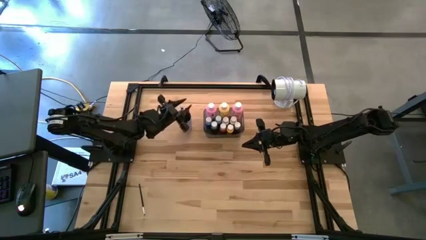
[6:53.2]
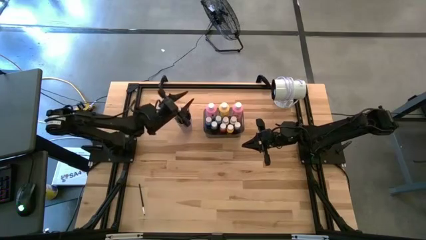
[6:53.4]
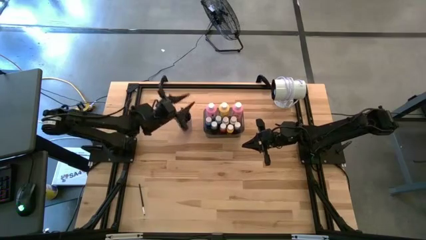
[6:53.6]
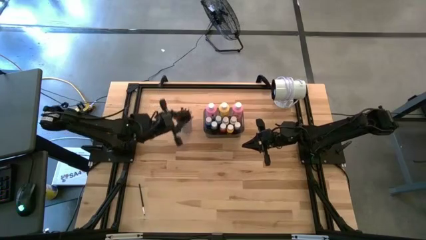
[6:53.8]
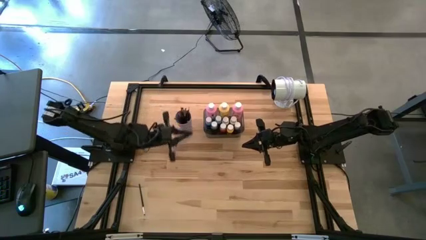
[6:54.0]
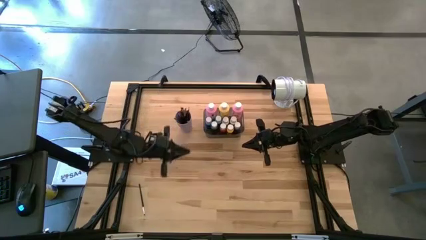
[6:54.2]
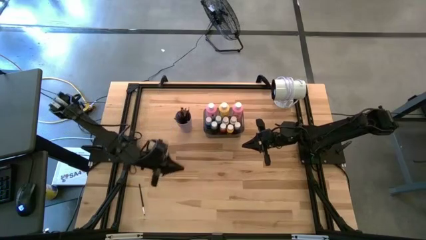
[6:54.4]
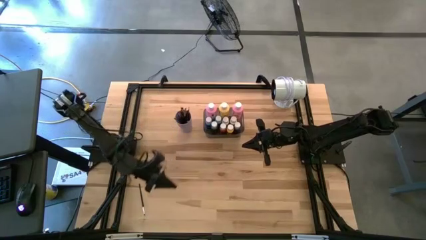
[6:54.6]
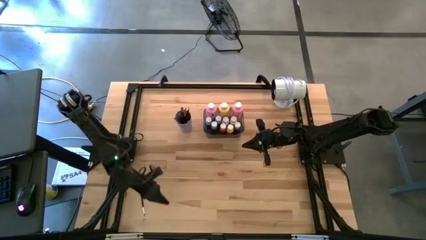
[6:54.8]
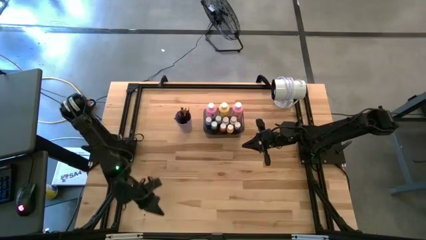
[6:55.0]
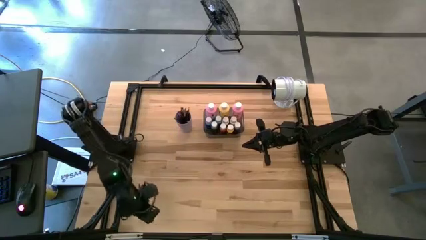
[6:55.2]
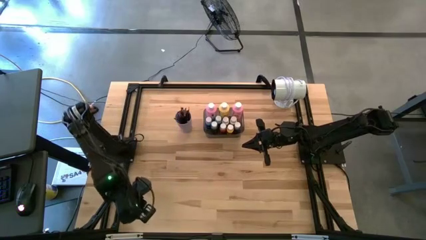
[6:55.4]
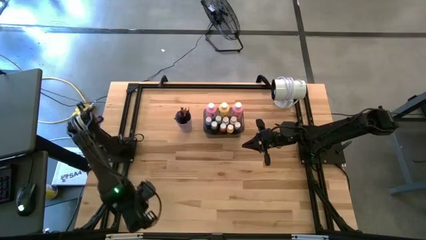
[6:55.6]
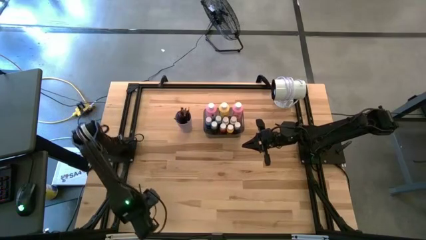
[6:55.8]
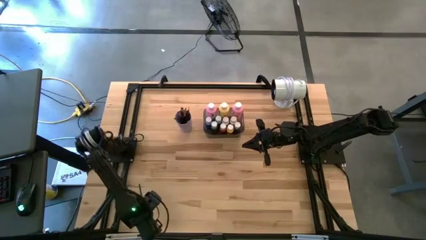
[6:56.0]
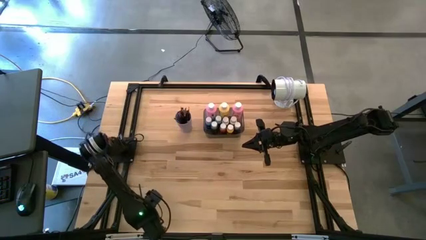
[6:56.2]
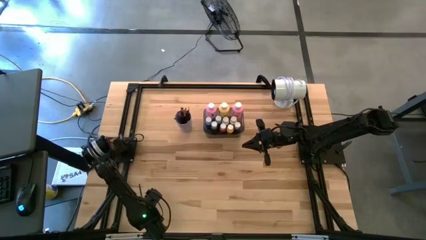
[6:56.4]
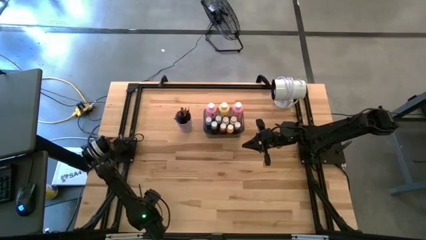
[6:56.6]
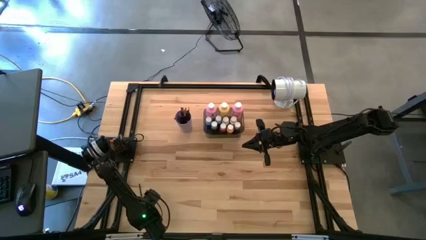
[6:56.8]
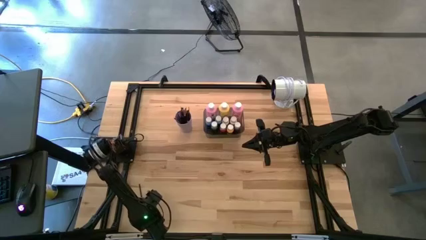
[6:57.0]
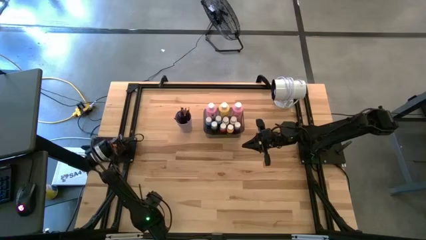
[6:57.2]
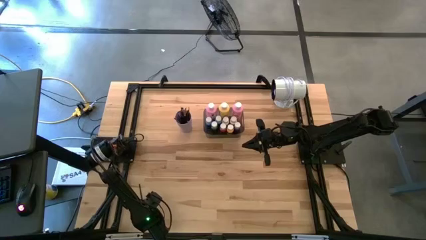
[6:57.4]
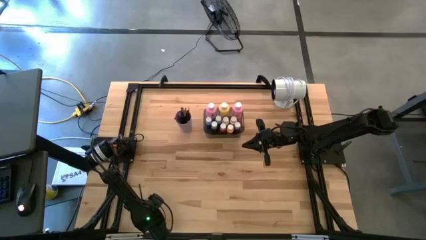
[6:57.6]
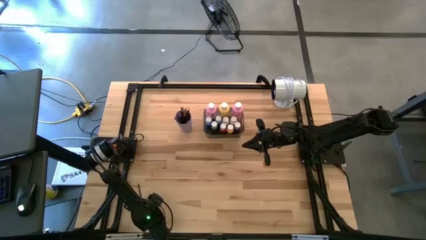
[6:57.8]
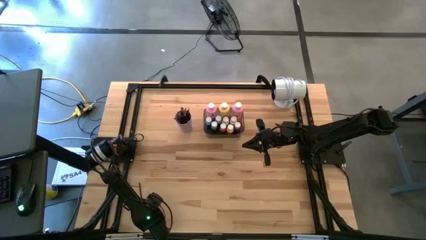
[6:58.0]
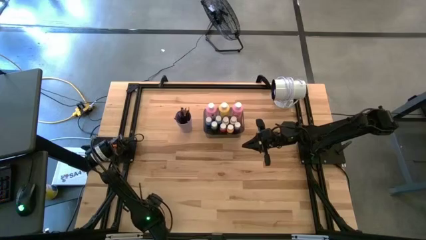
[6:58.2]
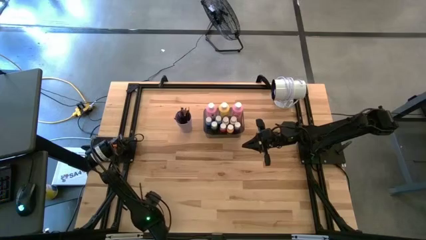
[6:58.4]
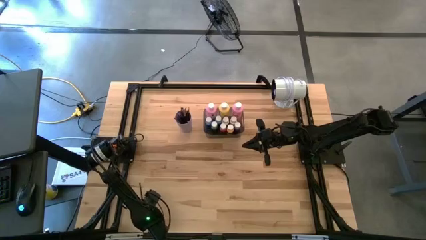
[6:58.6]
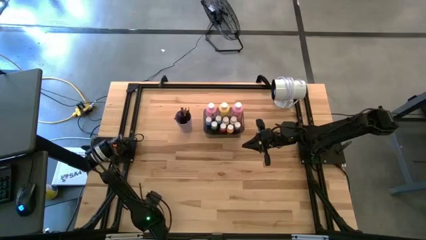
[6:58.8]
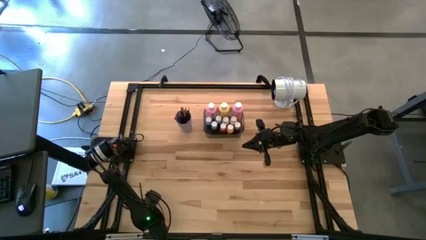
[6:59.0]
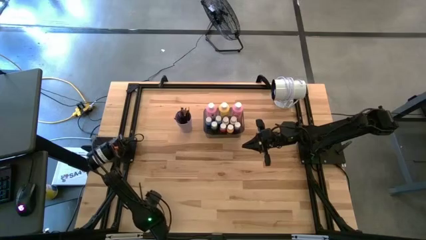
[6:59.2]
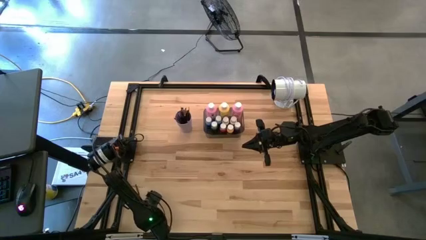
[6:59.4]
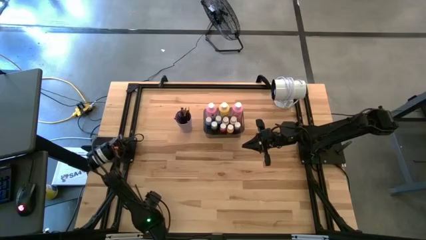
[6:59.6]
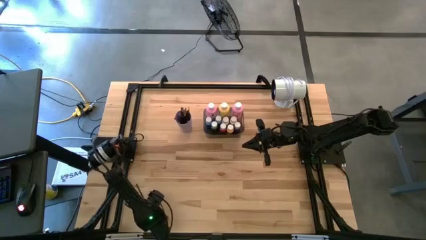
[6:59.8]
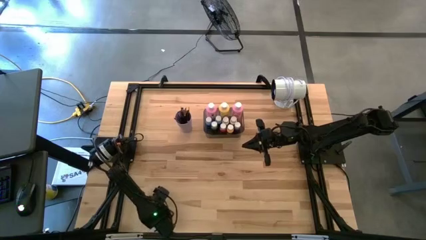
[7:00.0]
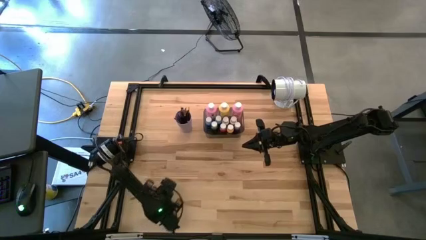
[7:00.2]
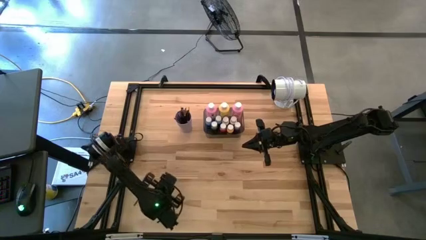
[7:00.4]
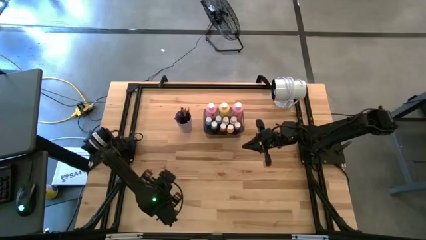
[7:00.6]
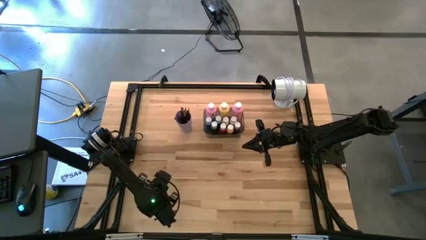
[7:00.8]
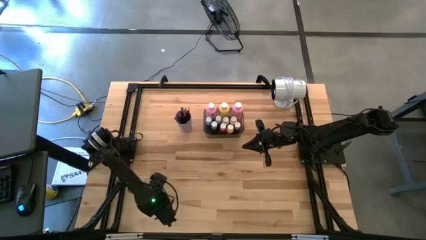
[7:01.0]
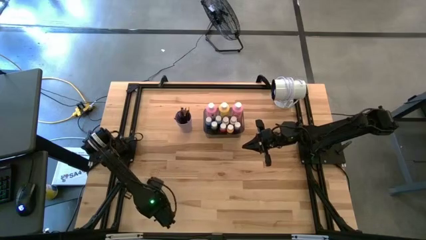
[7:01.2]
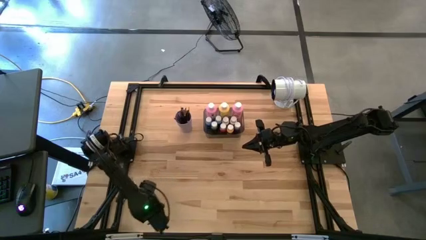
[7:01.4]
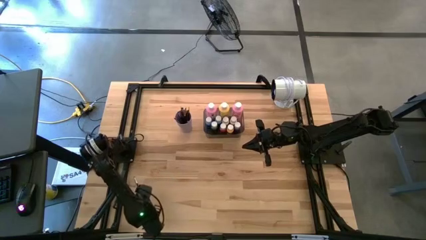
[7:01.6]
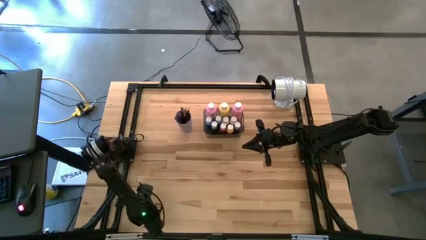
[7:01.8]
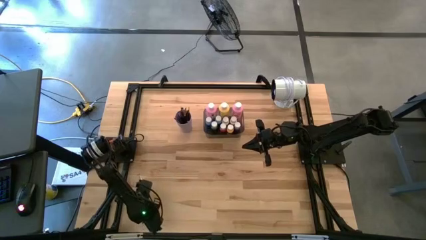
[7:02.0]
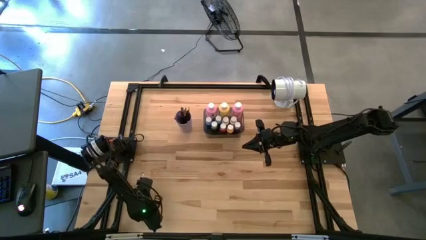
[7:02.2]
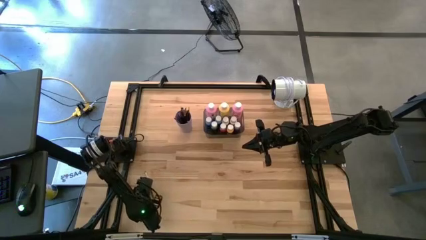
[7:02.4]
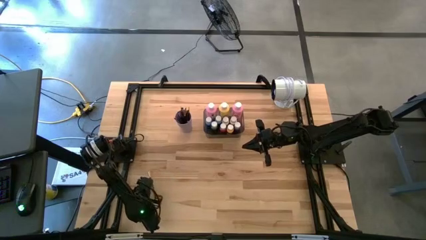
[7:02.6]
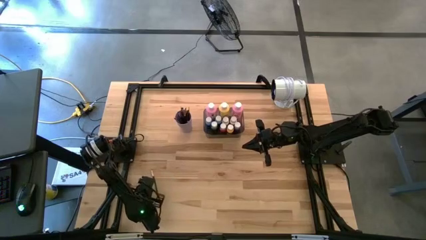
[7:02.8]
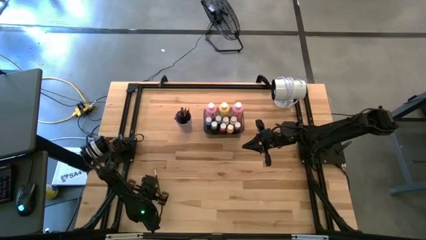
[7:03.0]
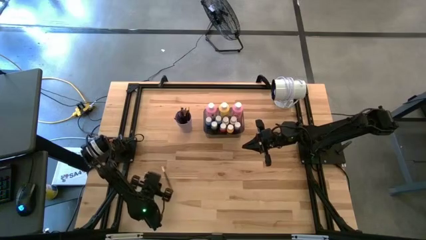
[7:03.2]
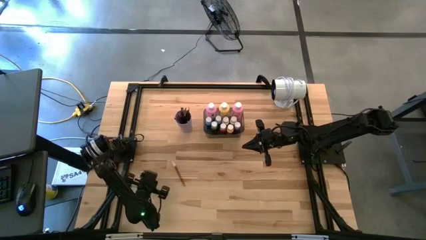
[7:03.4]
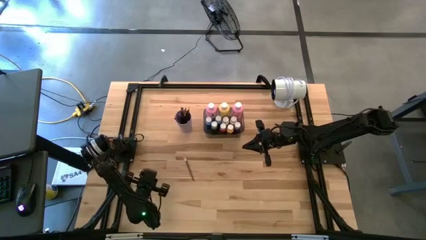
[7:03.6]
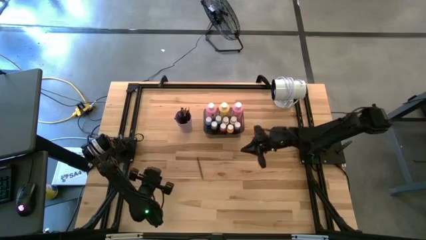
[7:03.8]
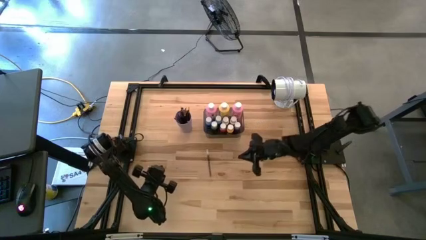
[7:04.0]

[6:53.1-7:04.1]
Task: Pick & Place Paint Supplies
Put the silver paint brush into the purple cup

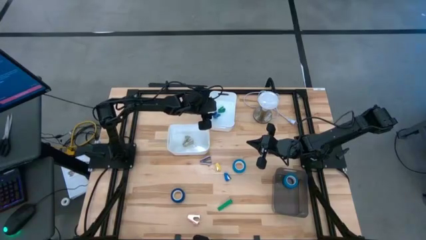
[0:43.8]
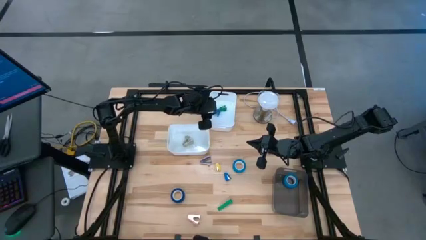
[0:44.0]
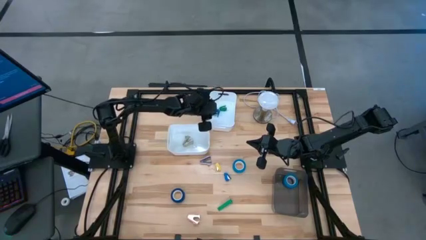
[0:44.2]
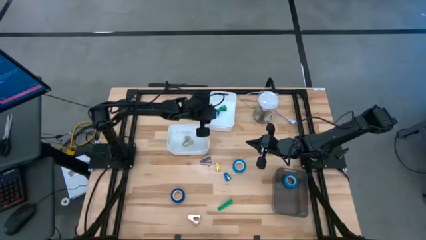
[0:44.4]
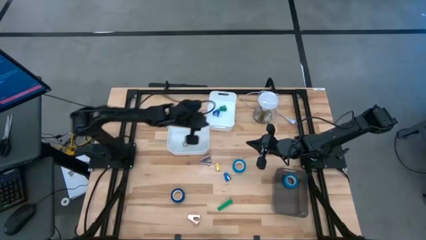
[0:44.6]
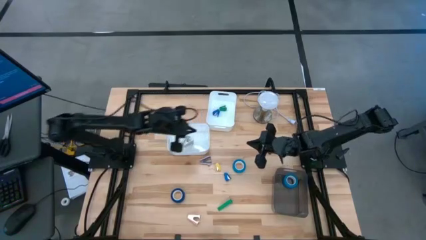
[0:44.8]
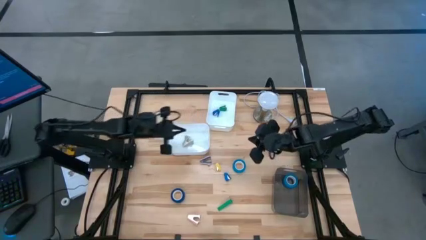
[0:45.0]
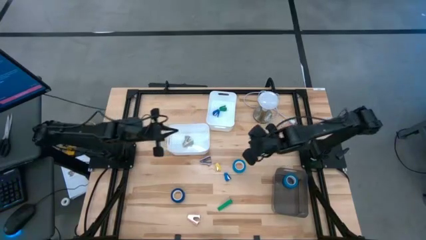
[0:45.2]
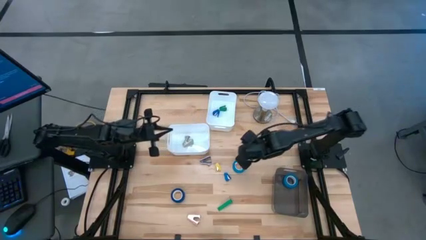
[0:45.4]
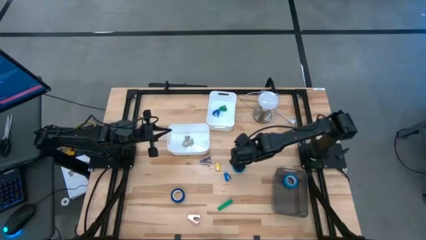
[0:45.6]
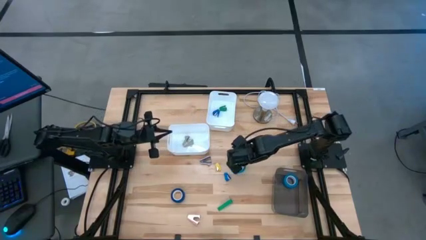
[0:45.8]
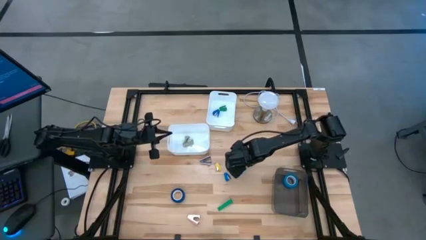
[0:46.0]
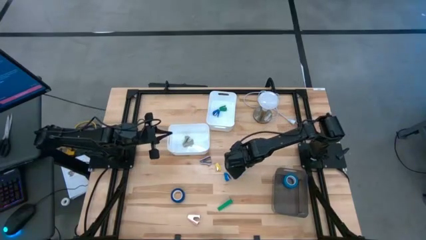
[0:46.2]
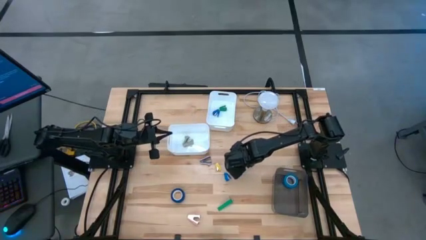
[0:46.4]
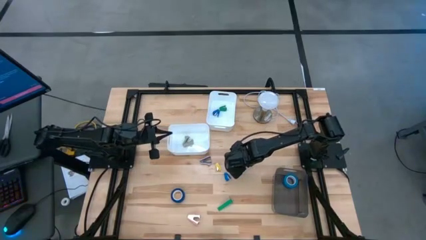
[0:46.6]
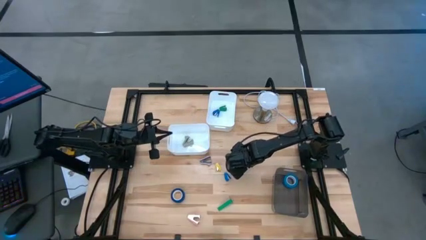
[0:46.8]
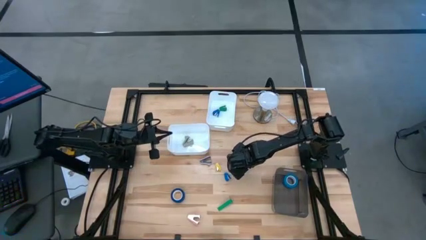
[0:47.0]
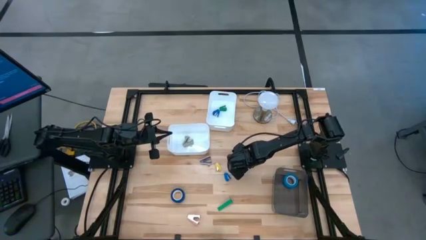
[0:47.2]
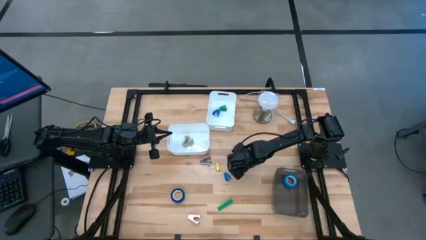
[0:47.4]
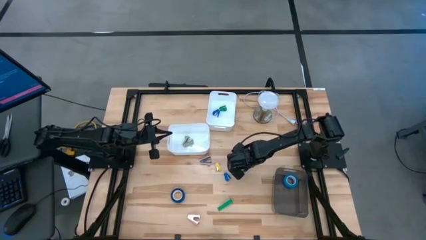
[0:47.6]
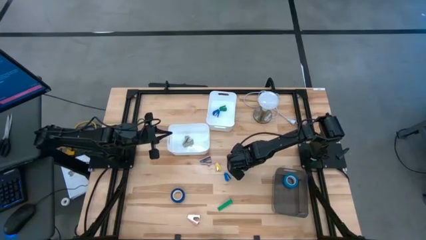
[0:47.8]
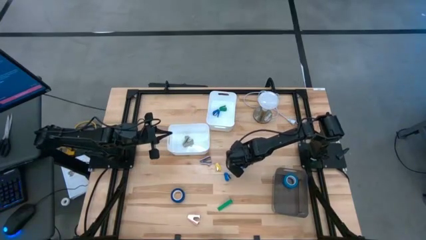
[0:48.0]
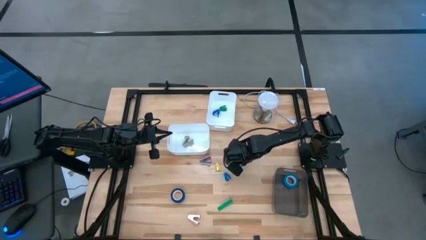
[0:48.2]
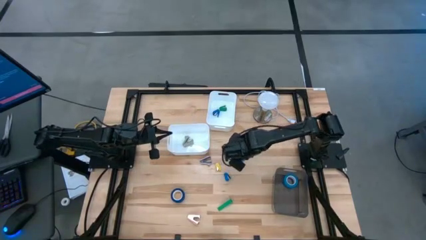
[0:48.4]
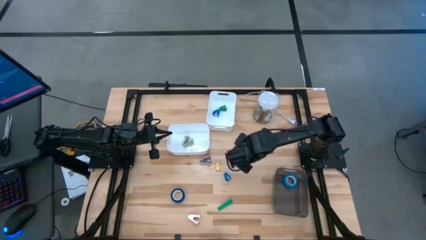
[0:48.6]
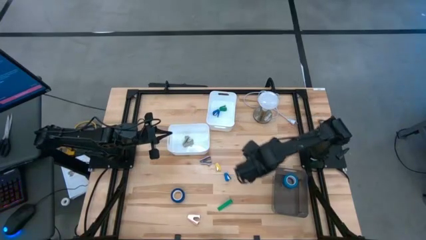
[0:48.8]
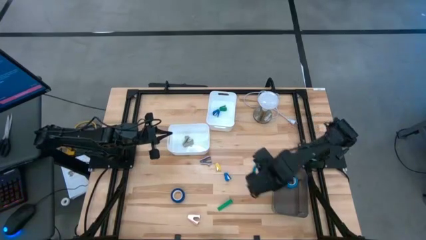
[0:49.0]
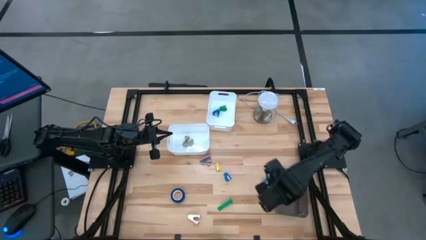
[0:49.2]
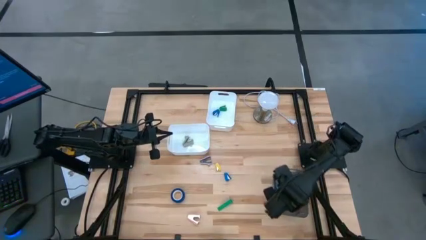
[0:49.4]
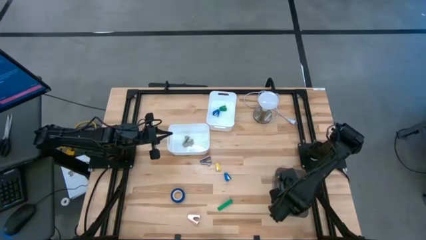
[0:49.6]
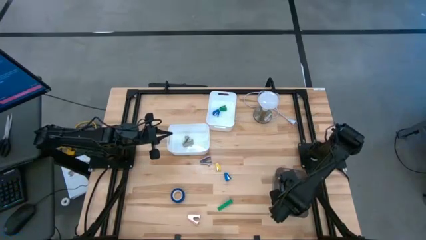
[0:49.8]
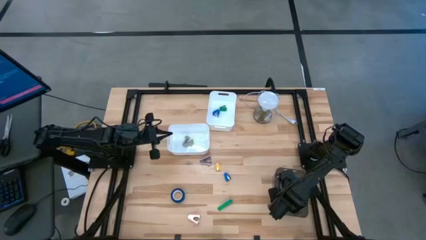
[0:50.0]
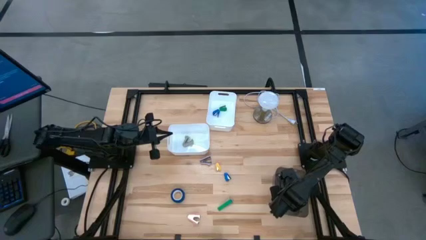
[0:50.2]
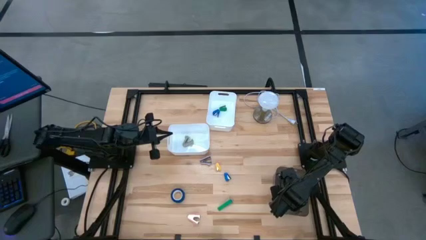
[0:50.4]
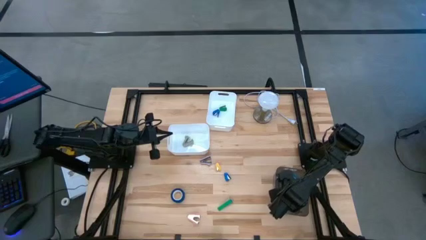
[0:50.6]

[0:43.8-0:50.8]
Task: Pick and place Stapler, Stapler remover, tape
Put the blue tape into the black transparent bin
